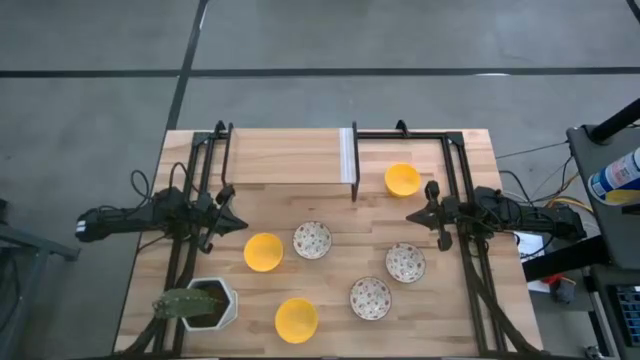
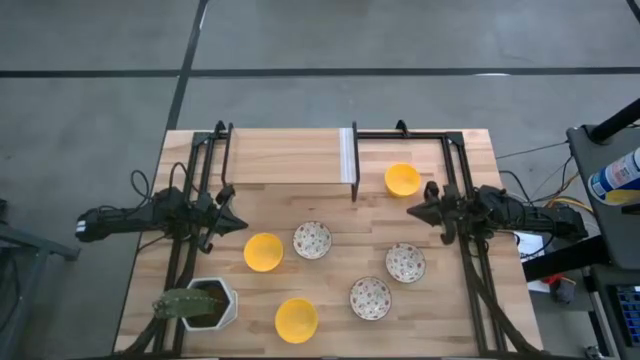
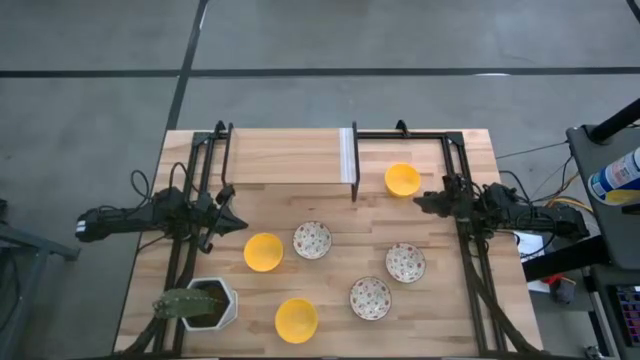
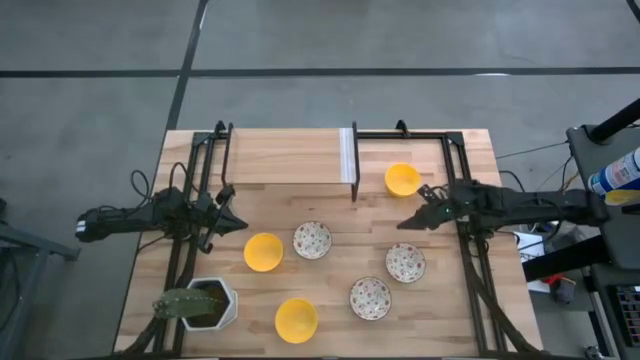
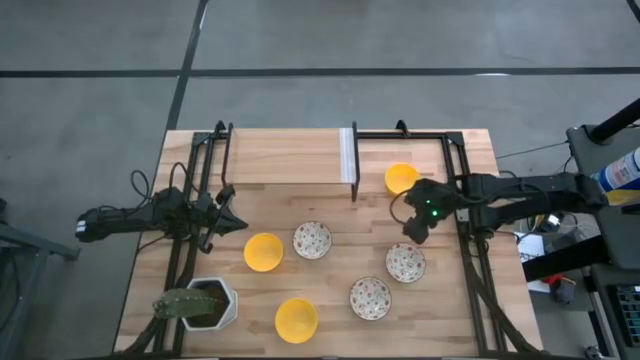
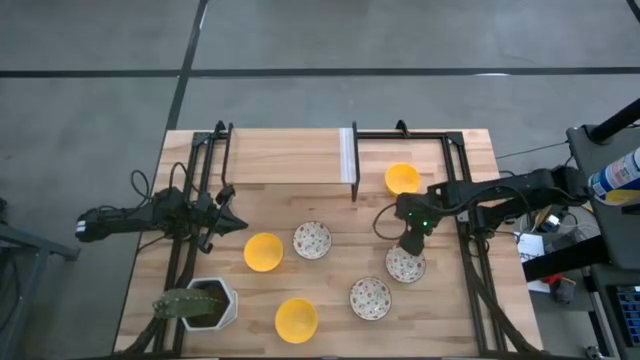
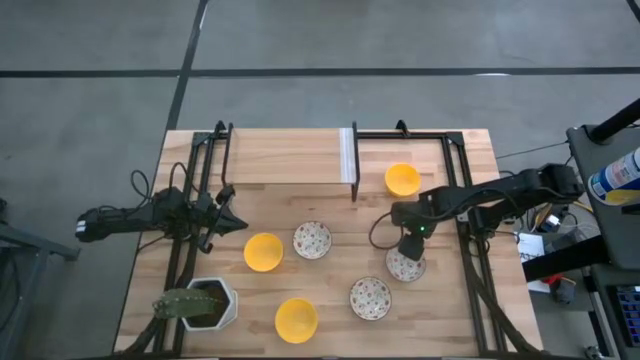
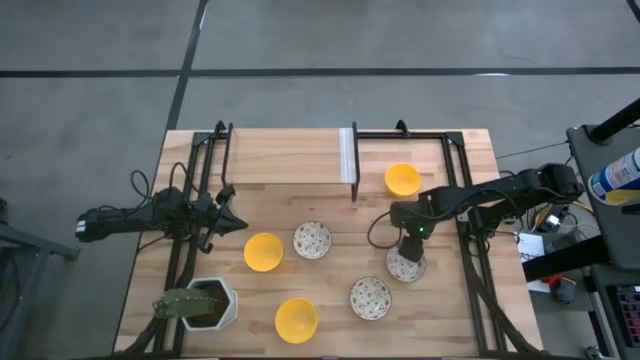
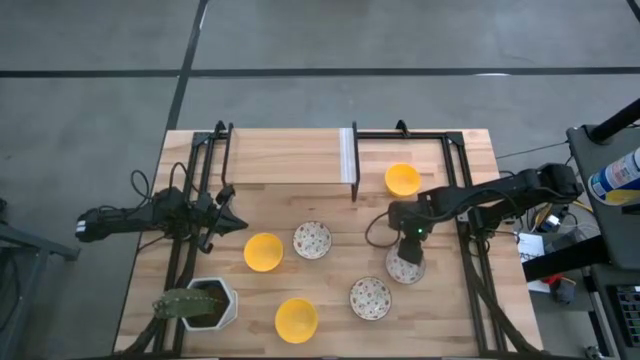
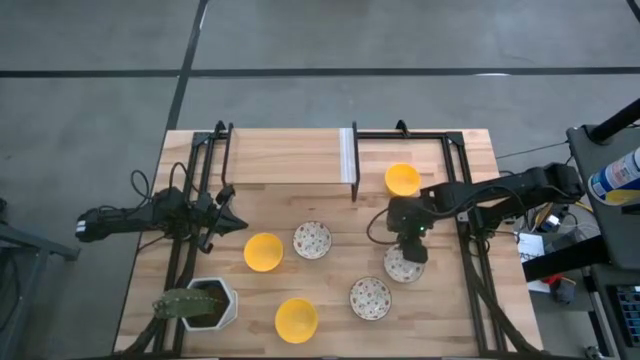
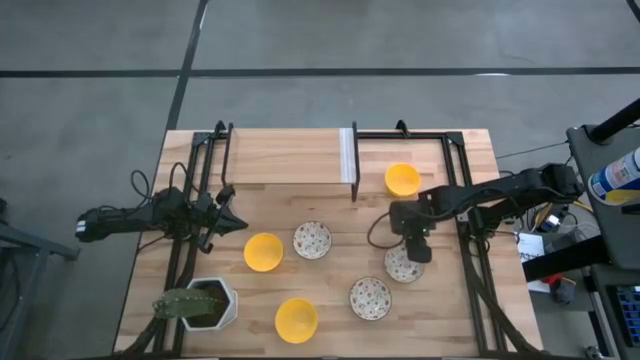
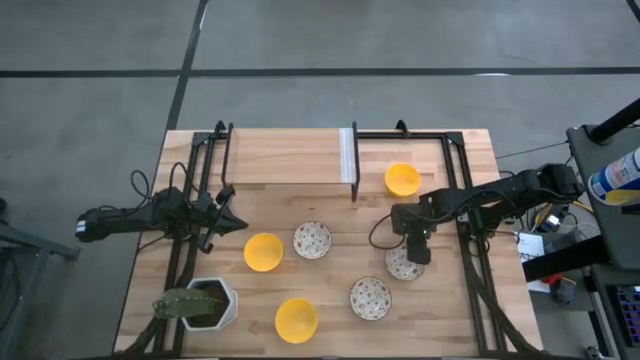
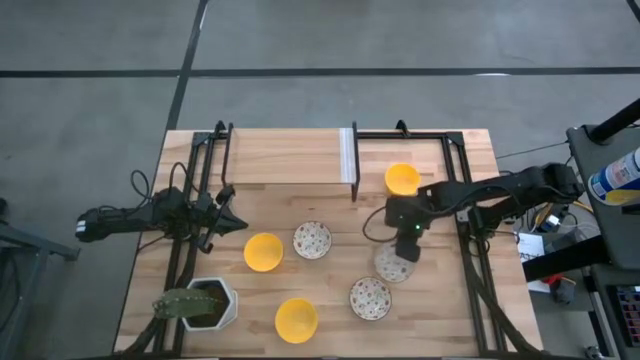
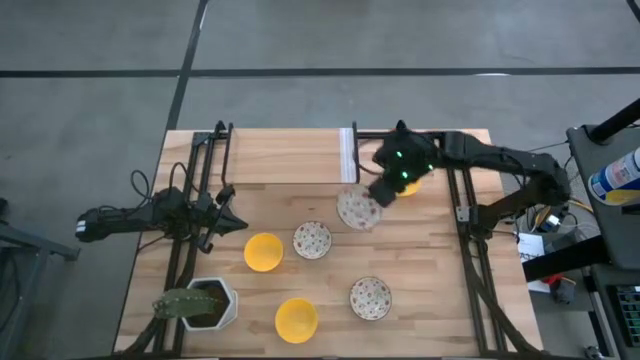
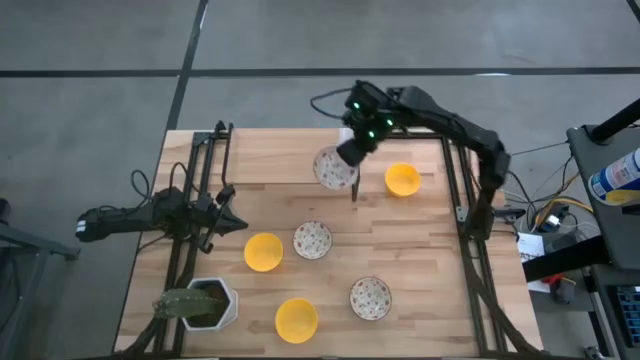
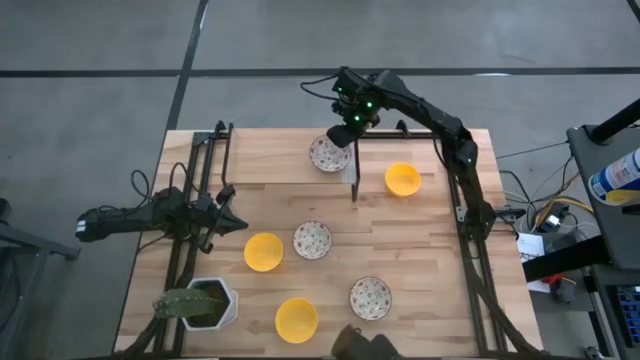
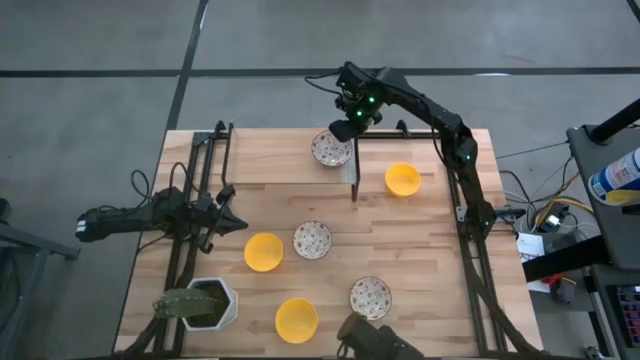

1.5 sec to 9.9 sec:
Task: Pick & Place Mini bowls
Put the right white patterned bowl on the shelf

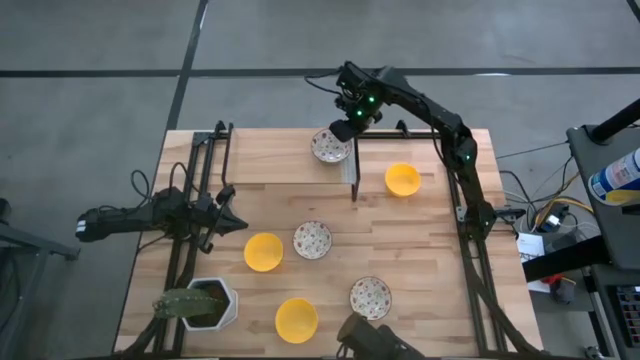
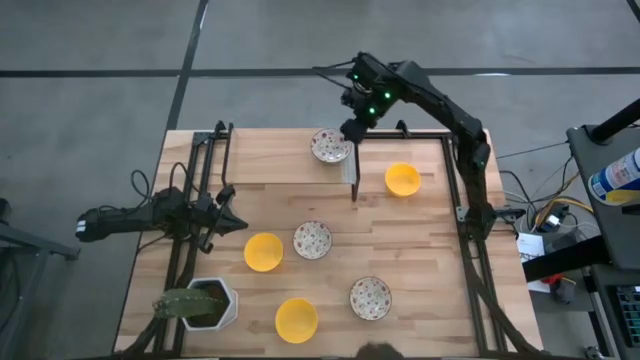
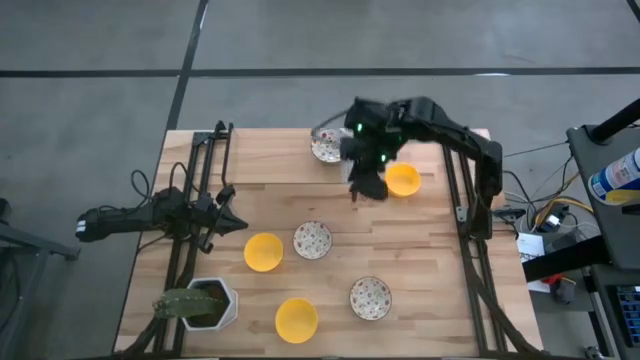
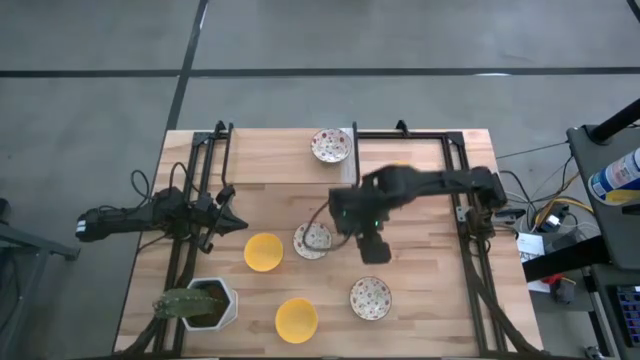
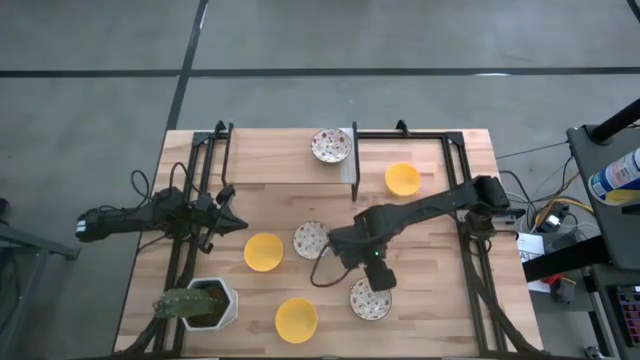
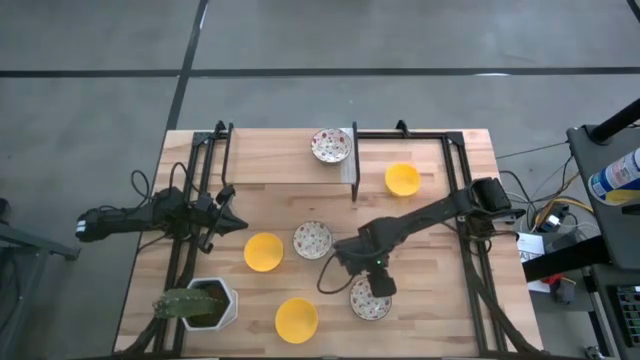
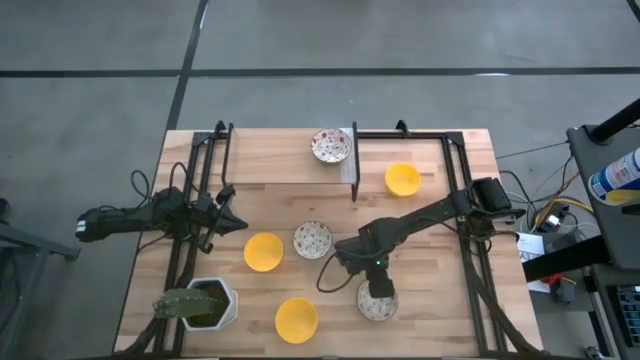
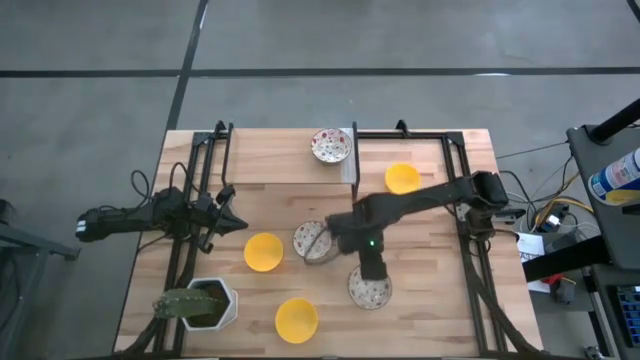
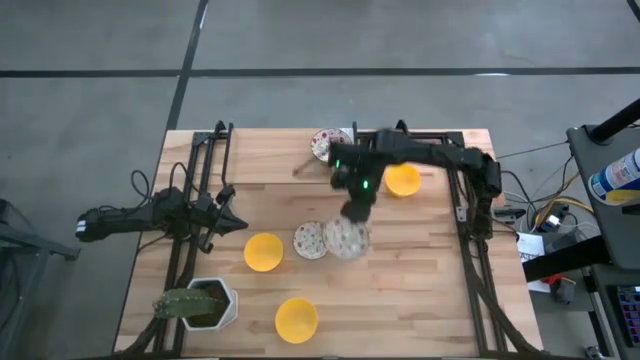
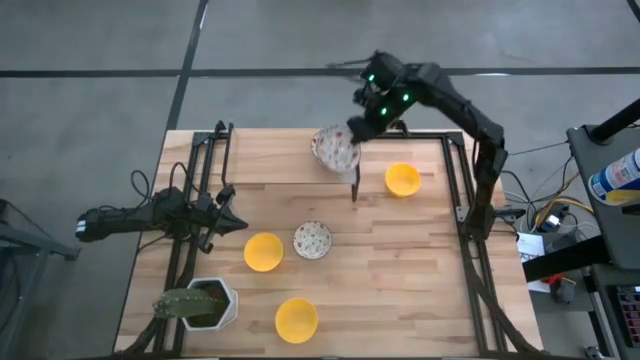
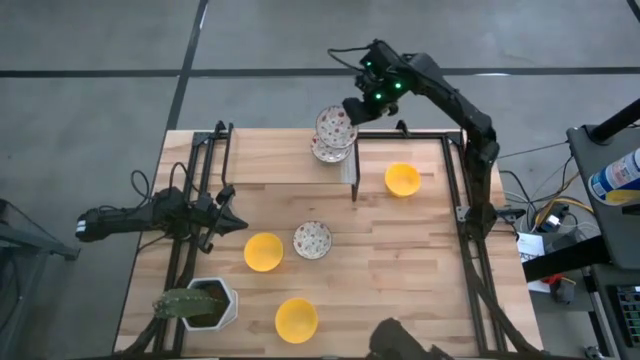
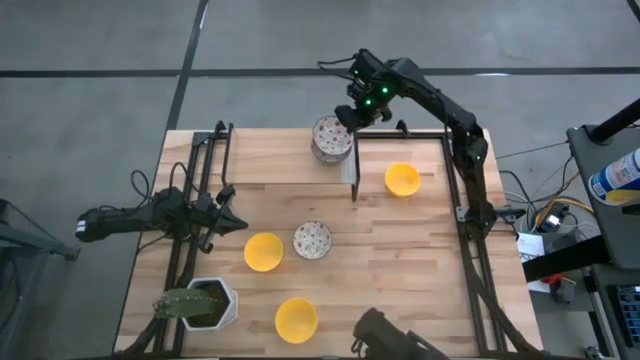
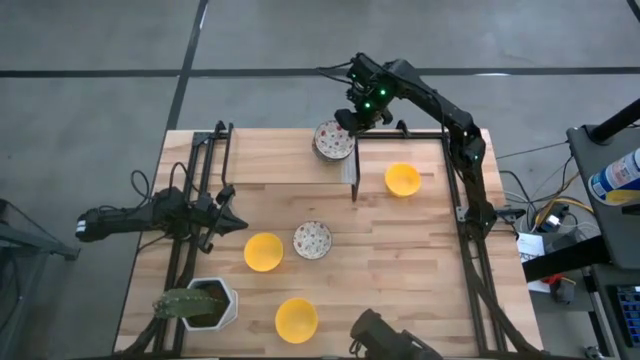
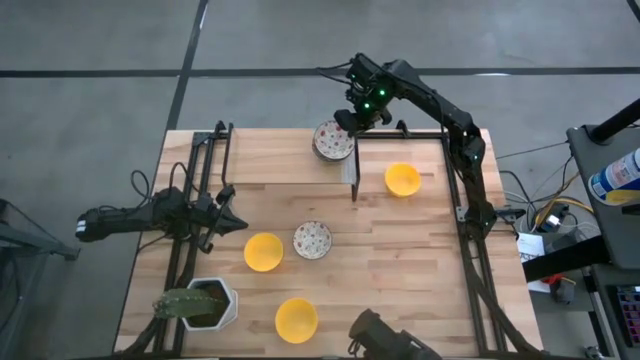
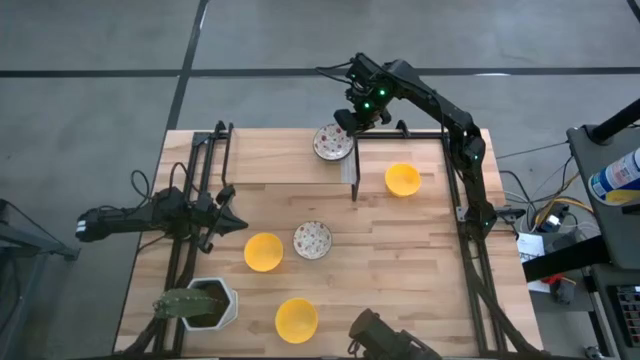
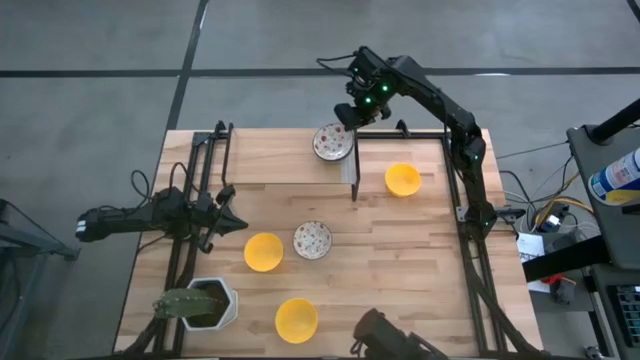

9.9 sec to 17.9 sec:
Stack the bottom white patterned bowl on top of the white patterned bowl on the shelf

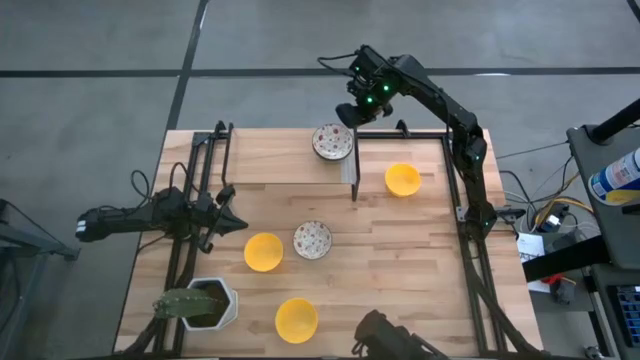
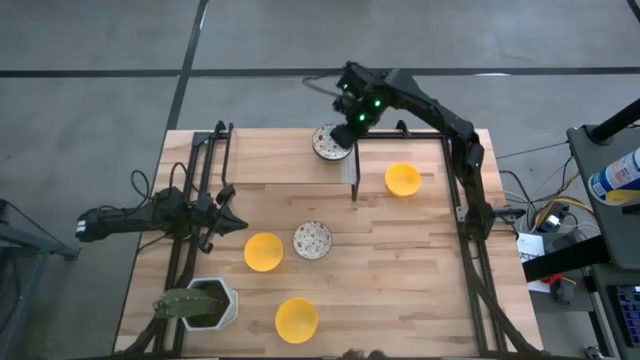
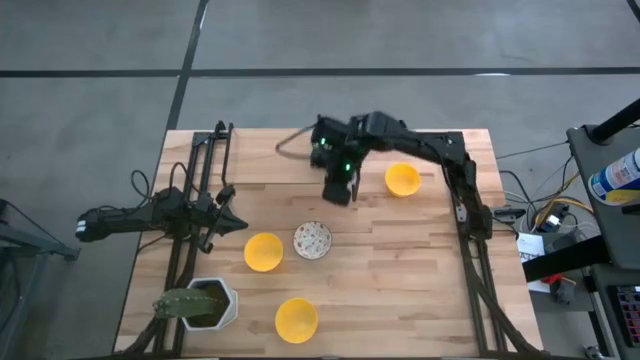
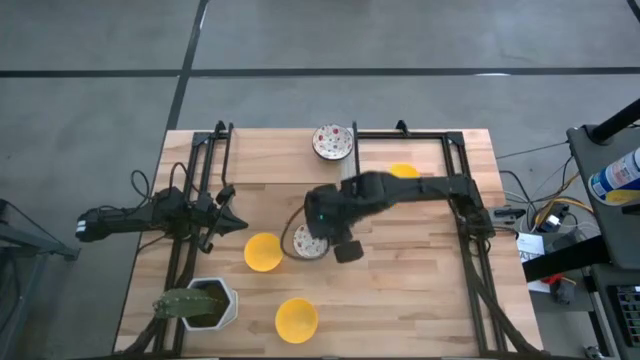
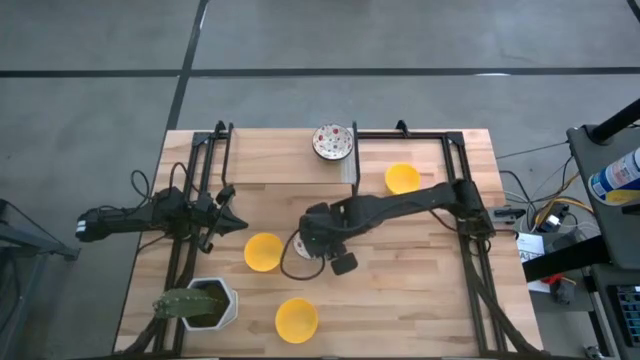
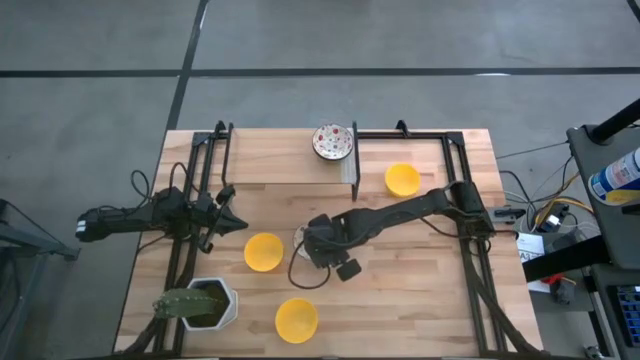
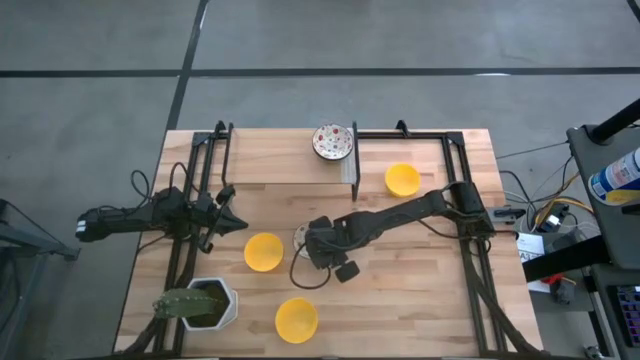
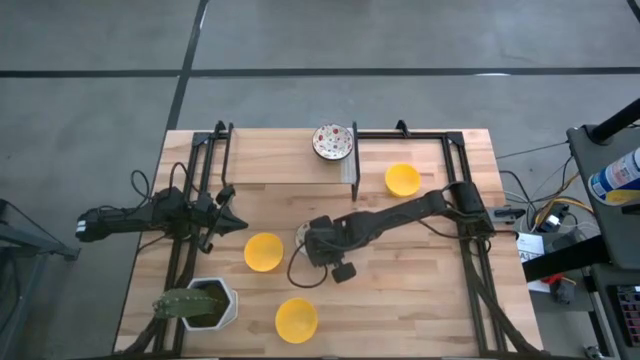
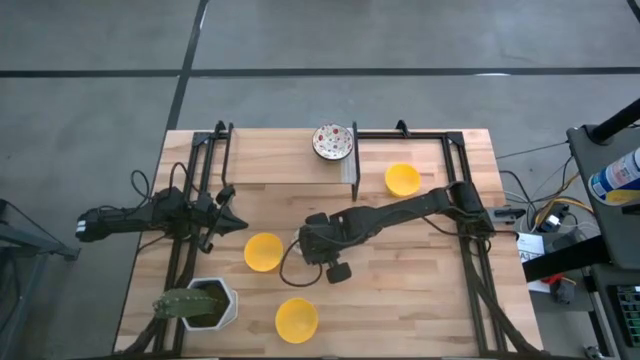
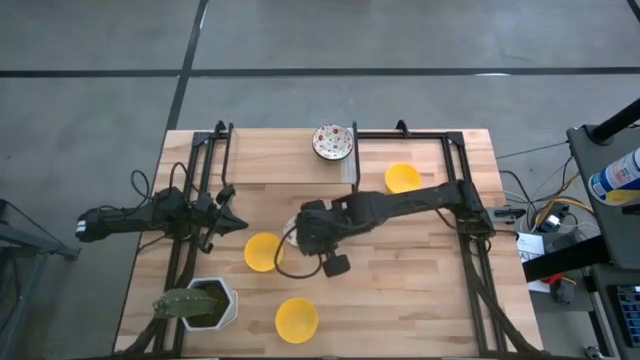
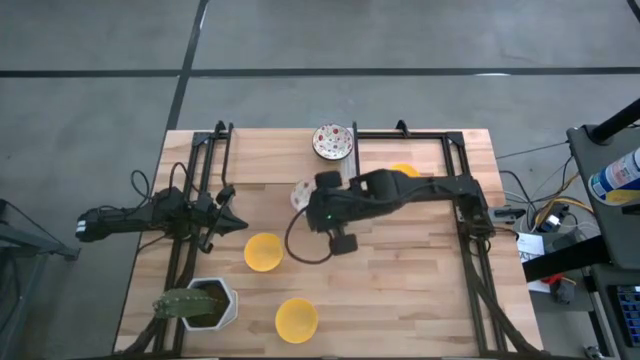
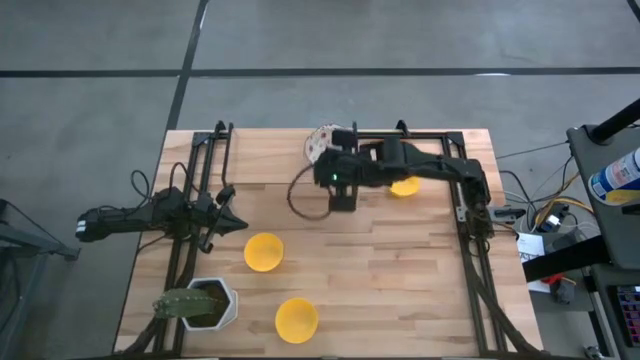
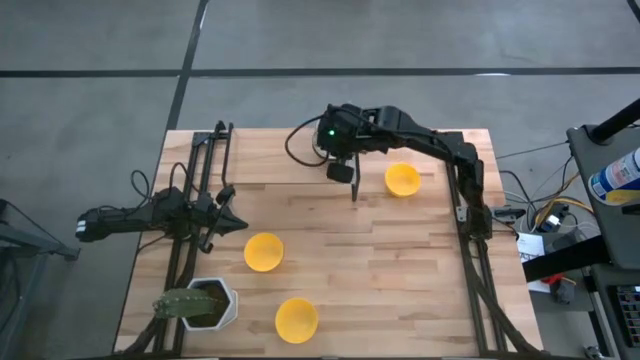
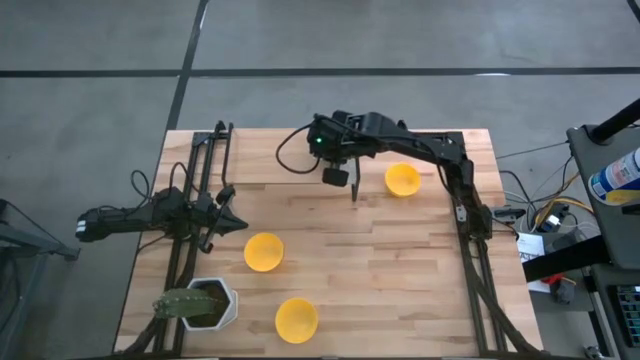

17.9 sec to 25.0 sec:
Stack the bottom white patterned bowl on top of the white patterned bowl on the shelf
